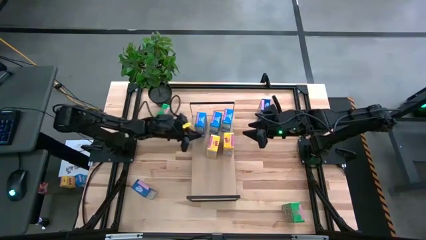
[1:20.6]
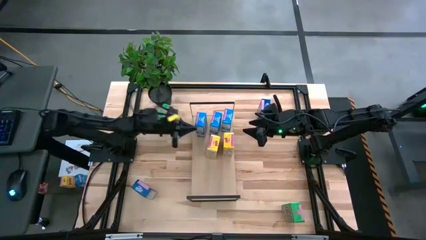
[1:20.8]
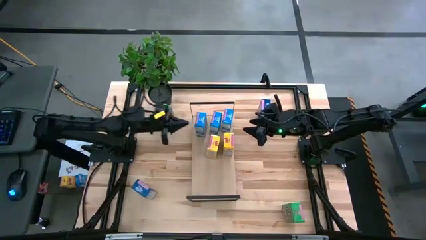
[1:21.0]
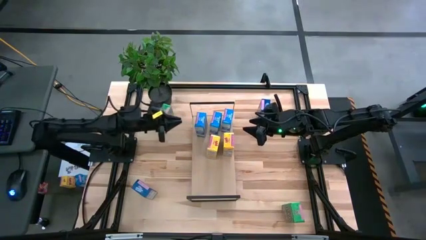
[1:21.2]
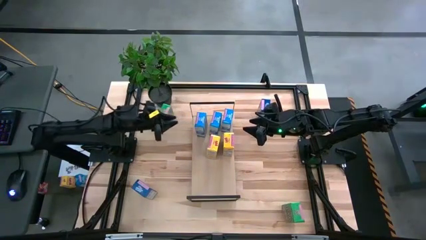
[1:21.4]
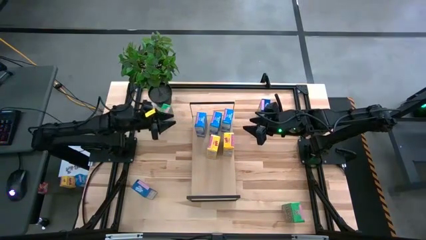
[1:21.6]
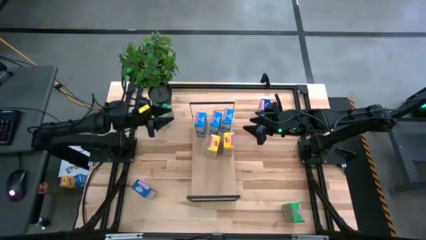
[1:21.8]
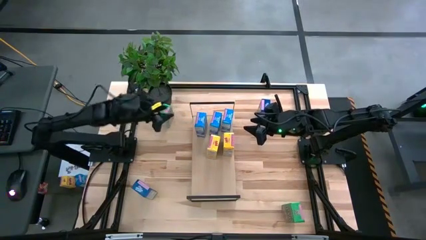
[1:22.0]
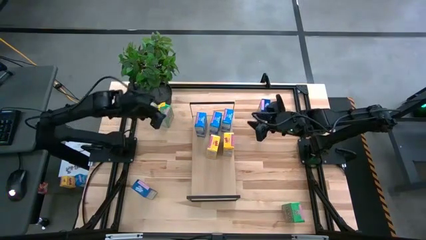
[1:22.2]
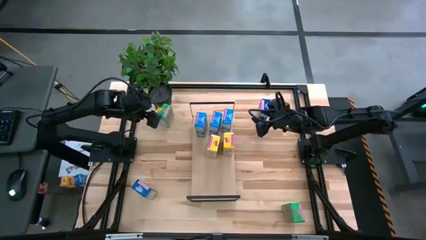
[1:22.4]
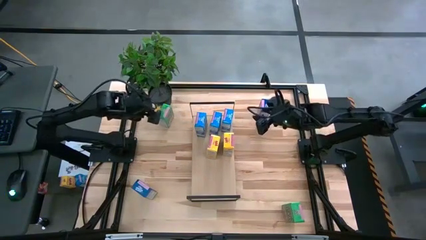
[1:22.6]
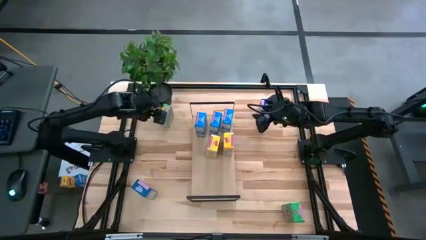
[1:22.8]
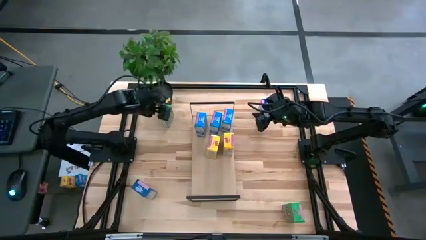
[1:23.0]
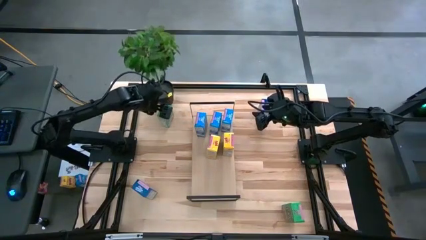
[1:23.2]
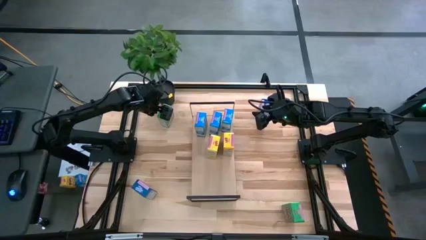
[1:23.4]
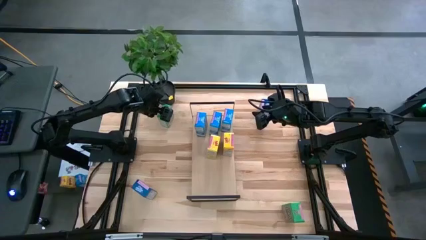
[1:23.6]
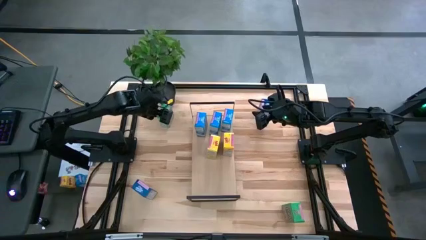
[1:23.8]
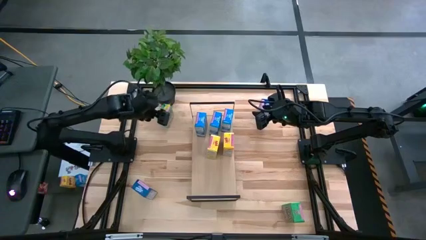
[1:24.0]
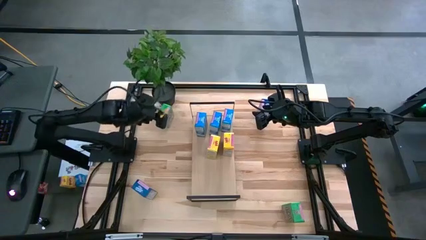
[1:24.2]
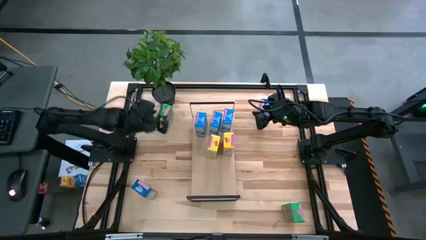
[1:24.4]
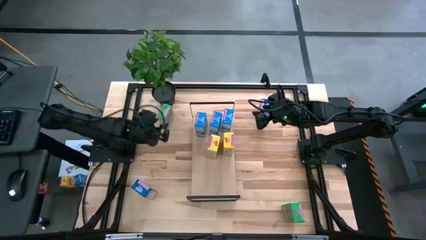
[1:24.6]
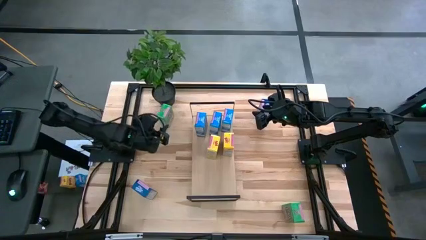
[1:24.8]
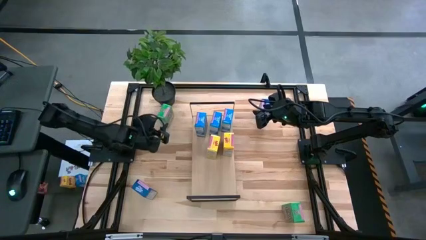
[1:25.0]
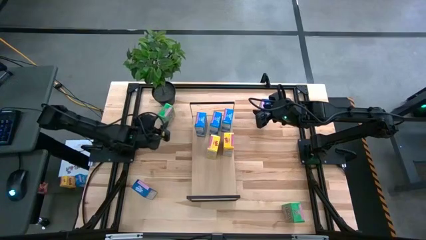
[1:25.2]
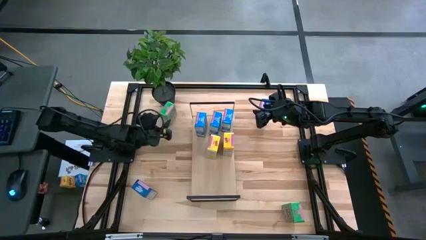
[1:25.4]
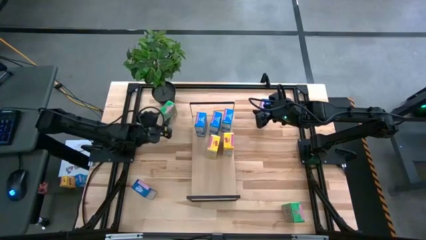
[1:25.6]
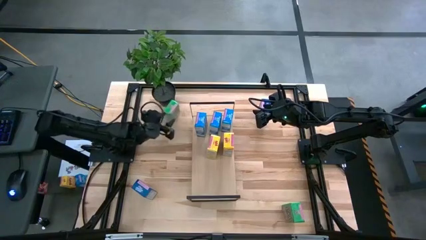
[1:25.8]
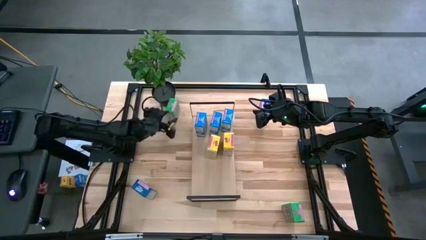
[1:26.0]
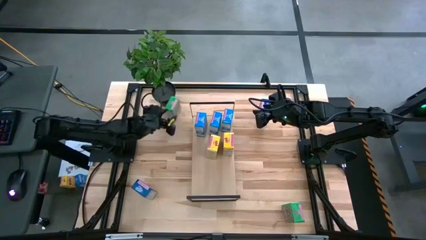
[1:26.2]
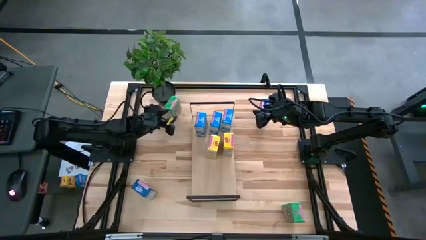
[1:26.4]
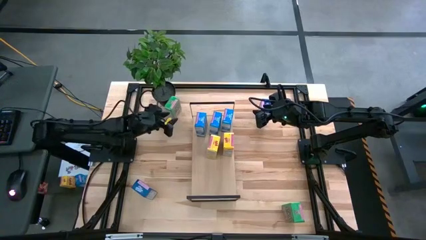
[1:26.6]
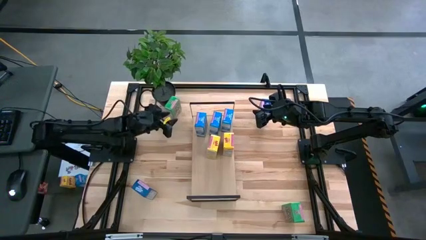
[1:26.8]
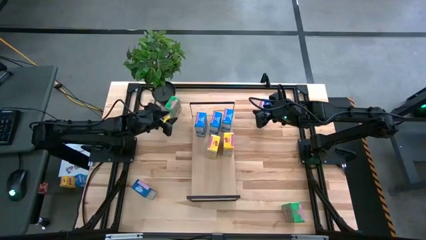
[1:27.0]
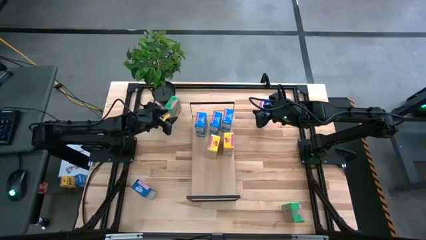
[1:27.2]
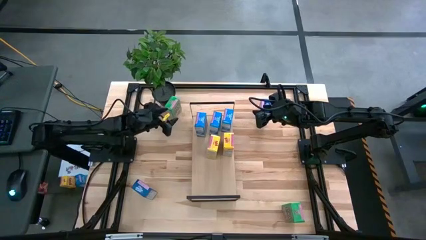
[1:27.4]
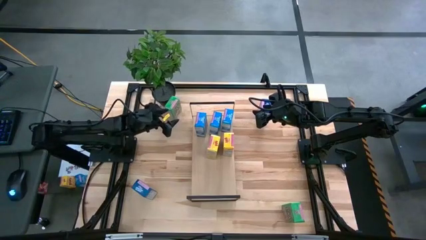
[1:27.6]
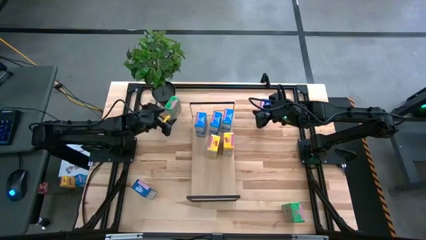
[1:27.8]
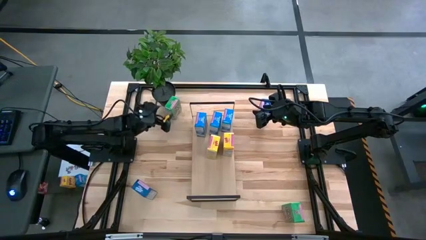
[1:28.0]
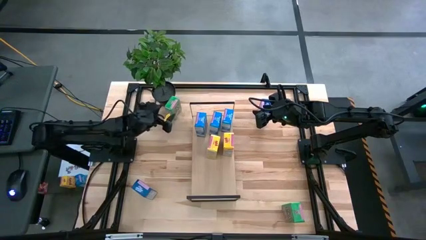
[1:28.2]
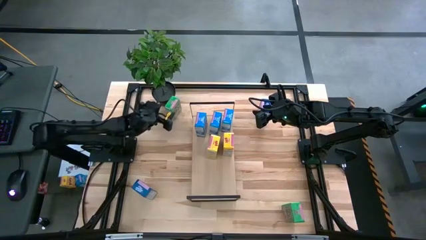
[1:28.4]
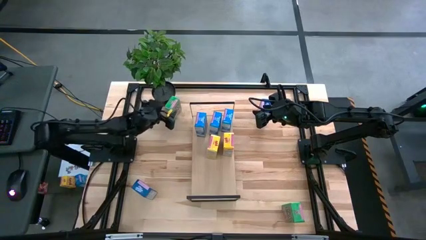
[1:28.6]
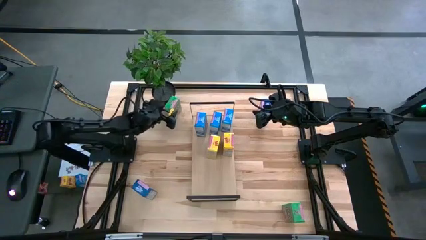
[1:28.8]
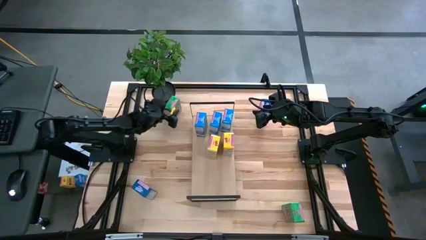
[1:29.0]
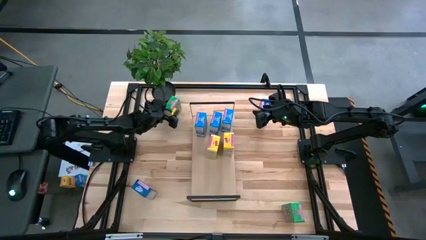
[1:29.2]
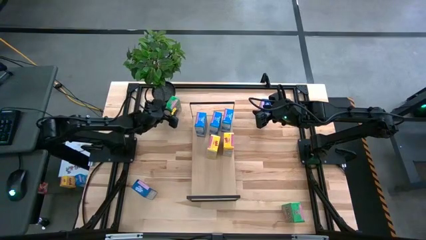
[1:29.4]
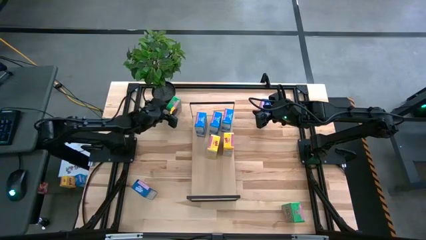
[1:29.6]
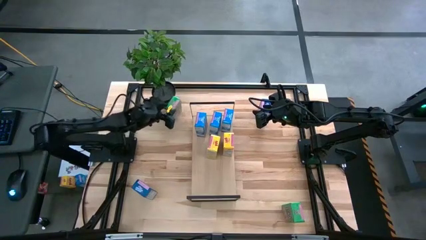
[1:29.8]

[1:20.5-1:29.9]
Task: Stack cereal on shelf
Put the top green cereal box on the shelf

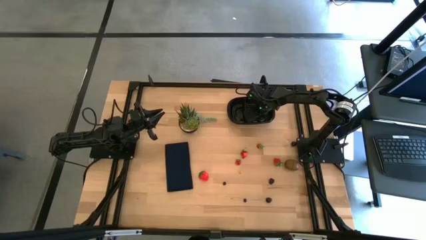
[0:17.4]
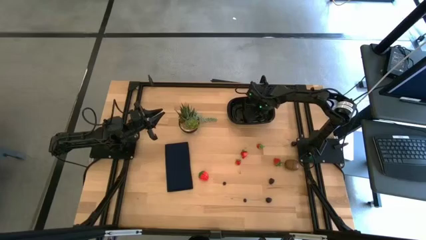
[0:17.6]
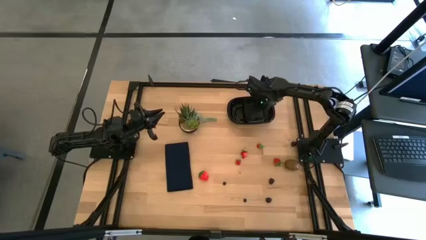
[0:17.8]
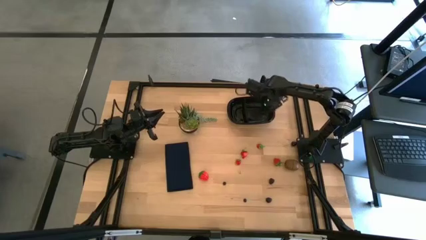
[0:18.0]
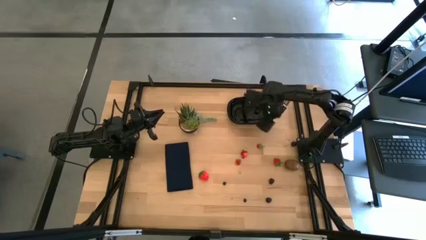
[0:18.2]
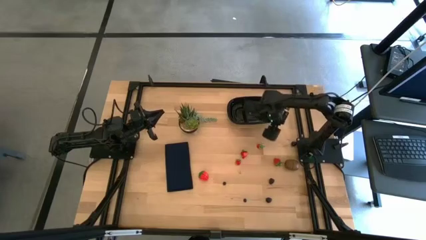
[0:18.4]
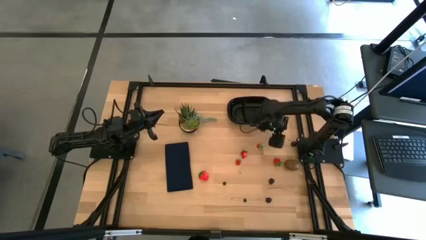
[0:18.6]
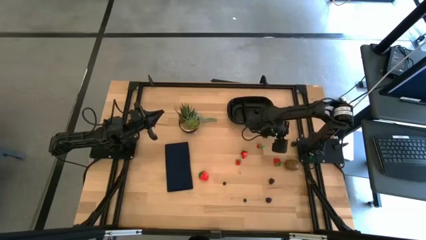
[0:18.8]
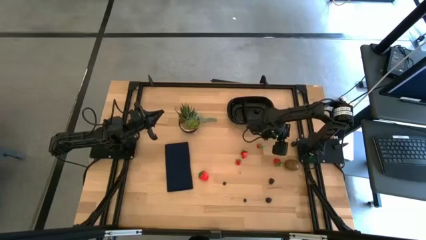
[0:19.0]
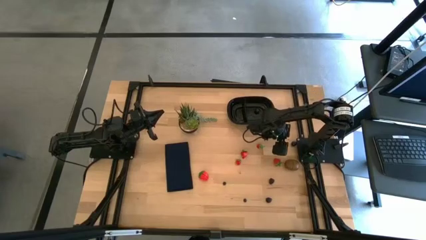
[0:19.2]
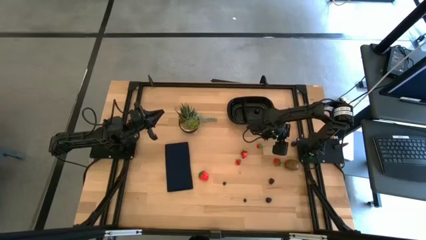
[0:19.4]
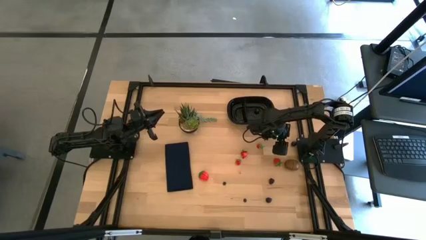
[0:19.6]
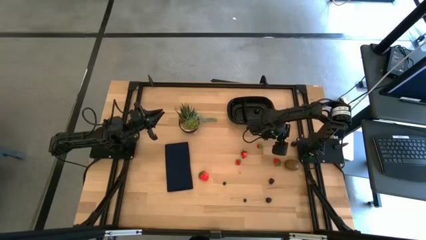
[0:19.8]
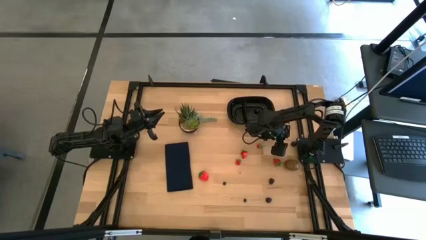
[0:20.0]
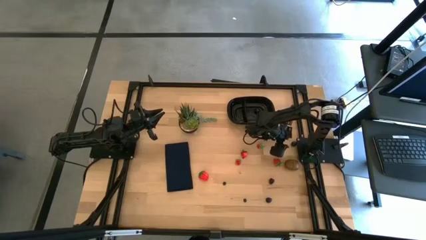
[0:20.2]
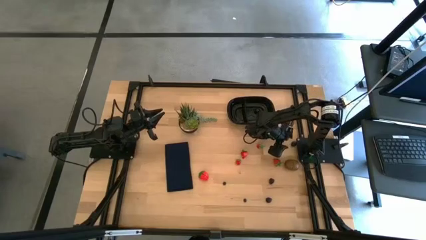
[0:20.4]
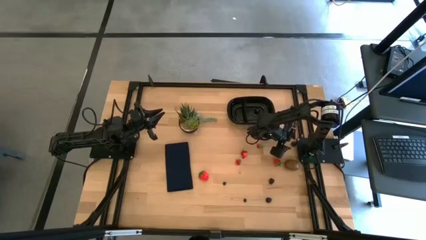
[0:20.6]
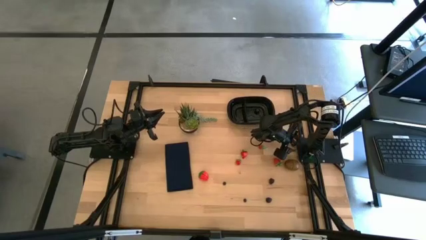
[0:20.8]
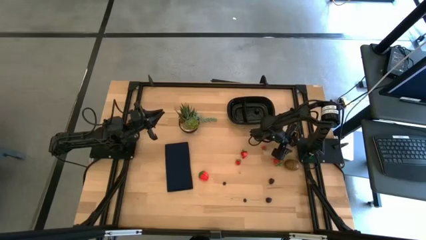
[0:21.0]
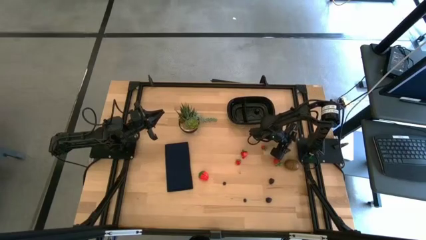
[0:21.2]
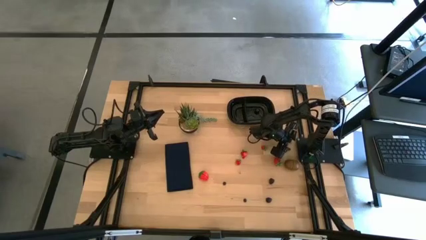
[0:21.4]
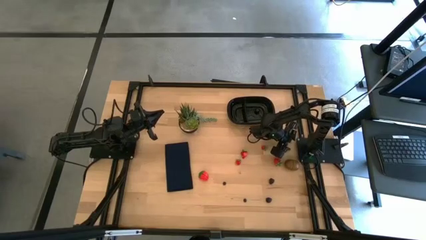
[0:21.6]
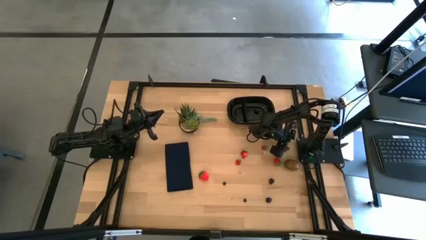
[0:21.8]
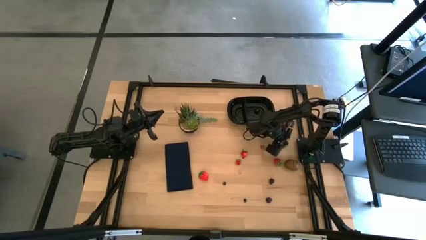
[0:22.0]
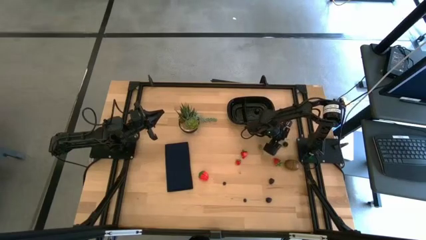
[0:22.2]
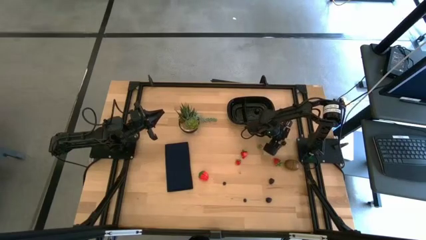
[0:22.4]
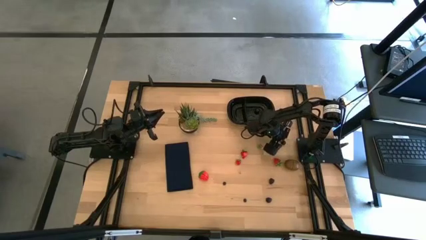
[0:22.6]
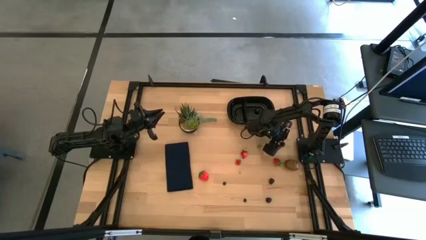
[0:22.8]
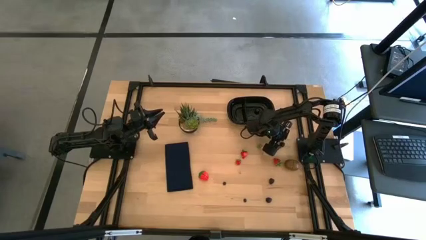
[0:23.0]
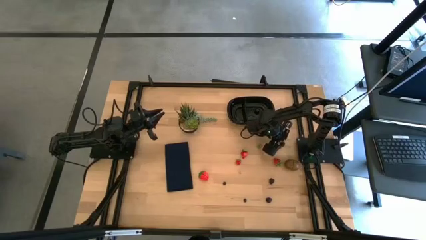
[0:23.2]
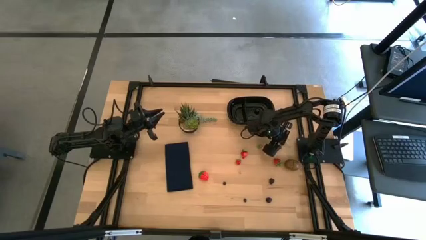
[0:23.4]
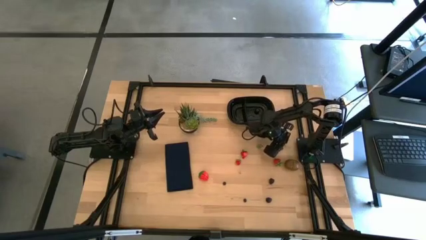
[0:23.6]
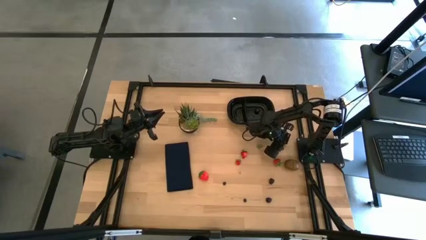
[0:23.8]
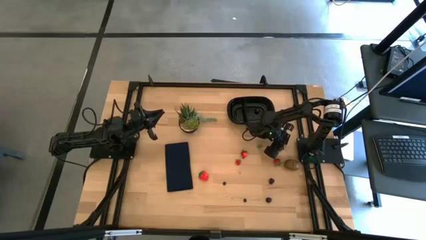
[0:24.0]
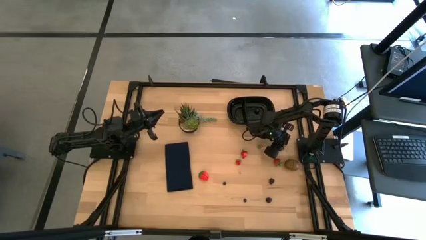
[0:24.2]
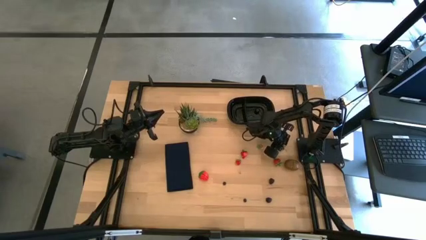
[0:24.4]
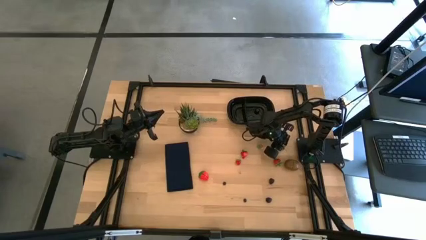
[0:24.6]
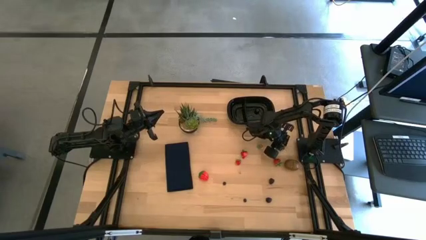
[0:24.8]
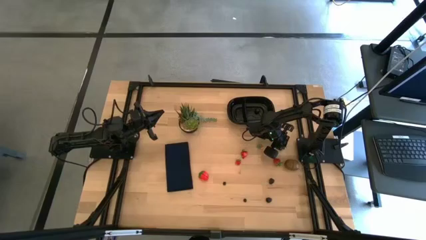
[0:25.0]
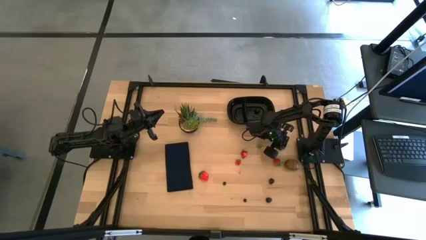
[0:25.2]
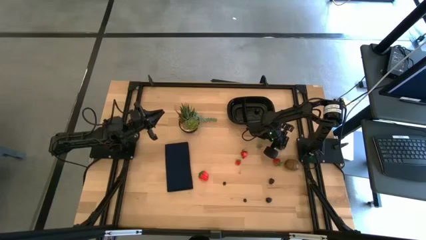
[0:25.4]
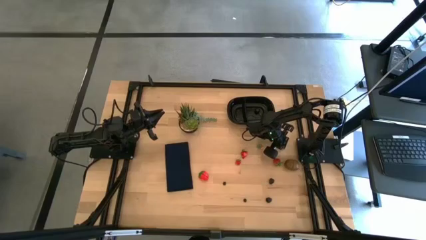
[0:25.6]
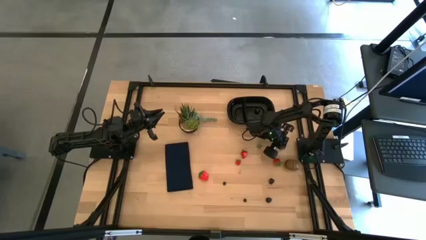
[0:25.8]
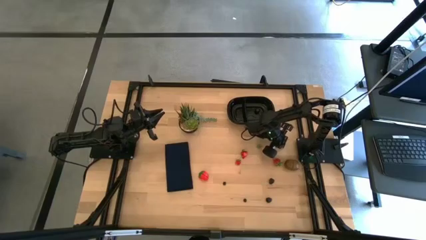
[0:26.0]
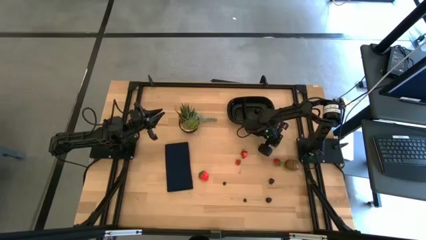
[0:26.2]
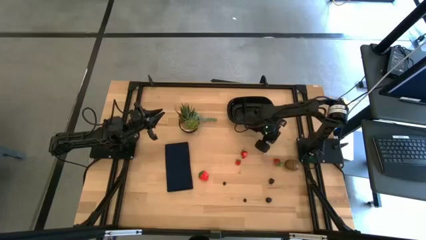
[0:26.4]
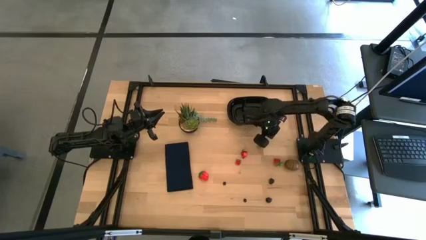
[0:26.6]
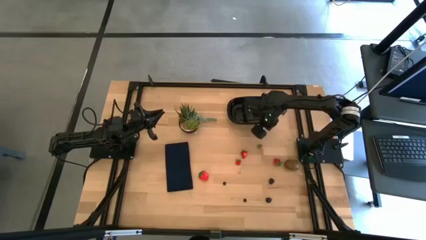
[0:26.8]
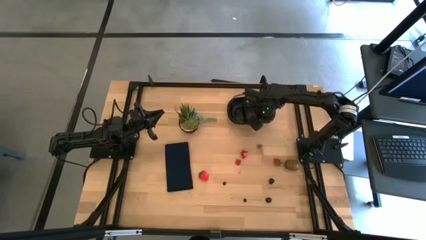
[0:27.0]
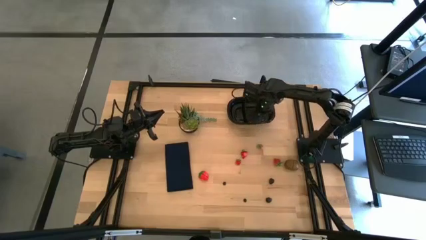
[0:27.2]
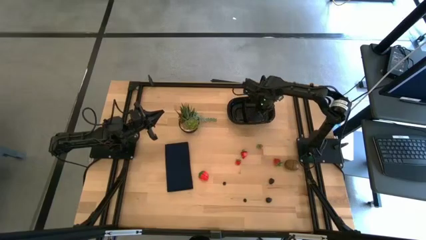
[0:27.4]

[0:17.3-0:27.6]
Task: Pick and placing Produce into tupperware
Put the black cherry into the black container
